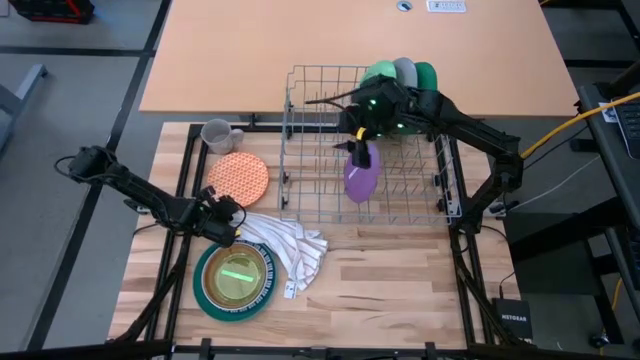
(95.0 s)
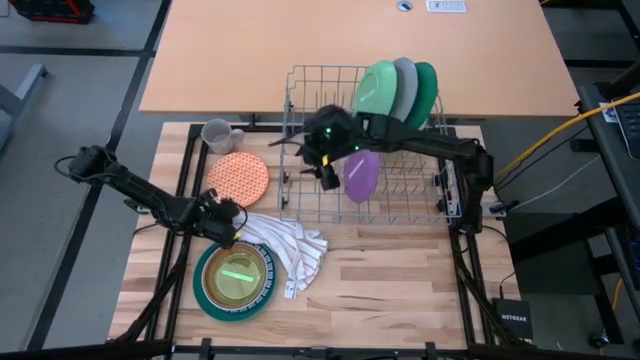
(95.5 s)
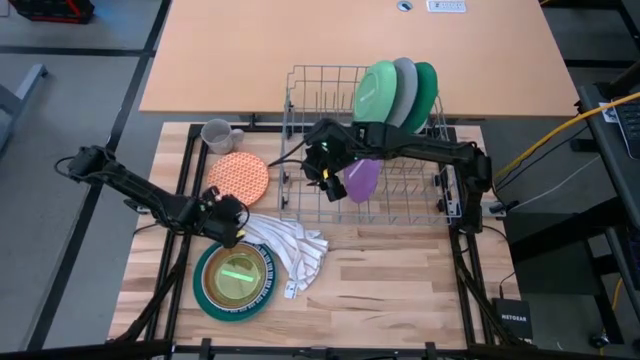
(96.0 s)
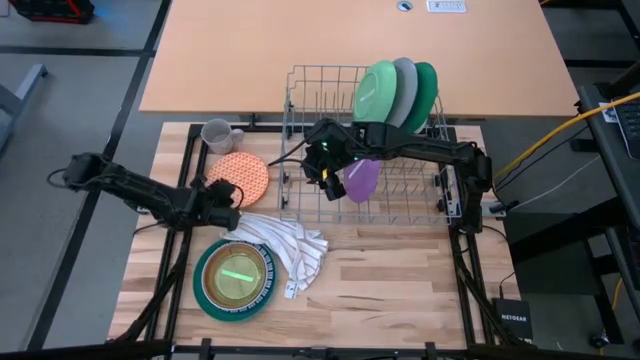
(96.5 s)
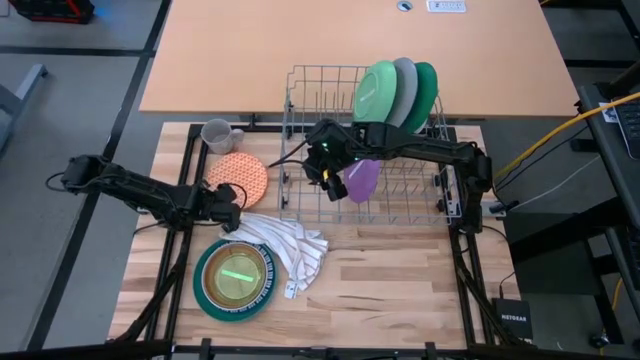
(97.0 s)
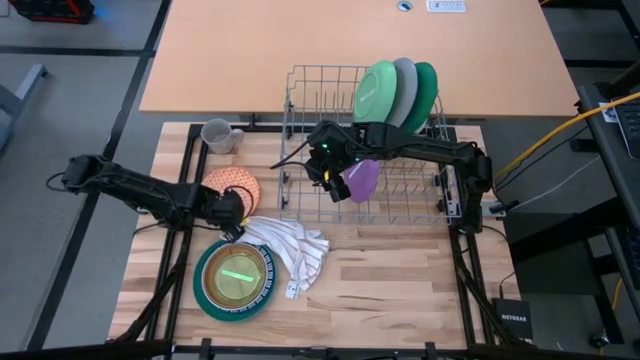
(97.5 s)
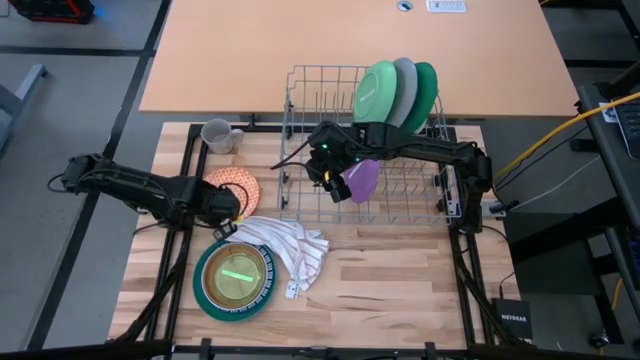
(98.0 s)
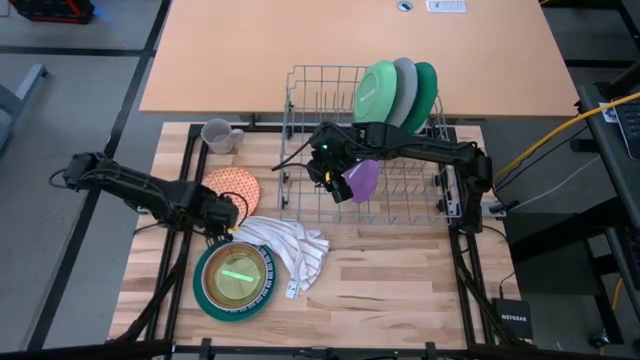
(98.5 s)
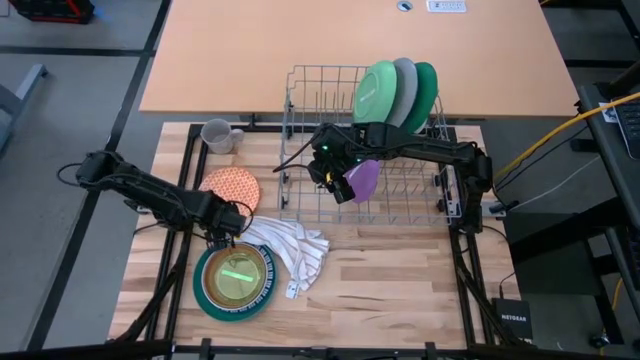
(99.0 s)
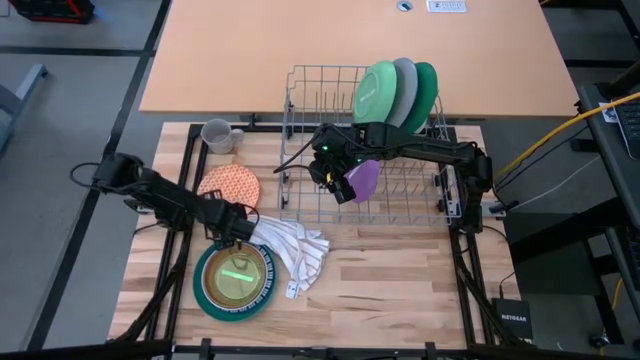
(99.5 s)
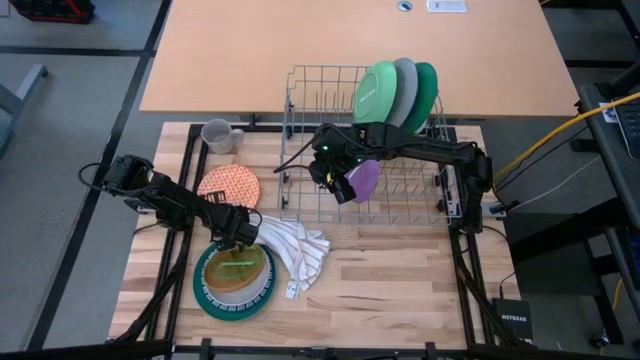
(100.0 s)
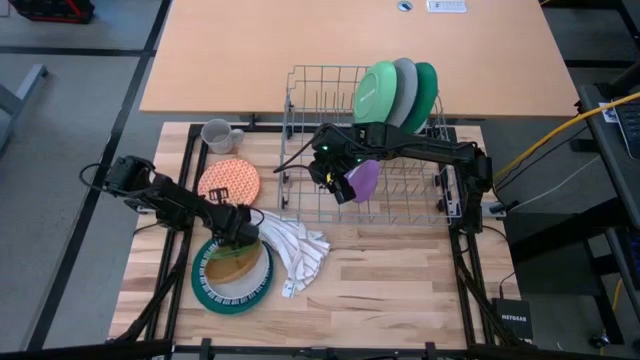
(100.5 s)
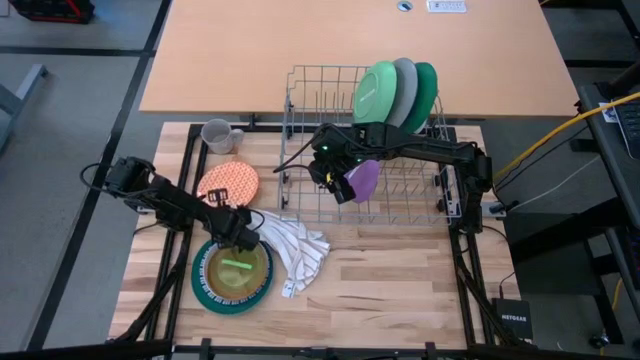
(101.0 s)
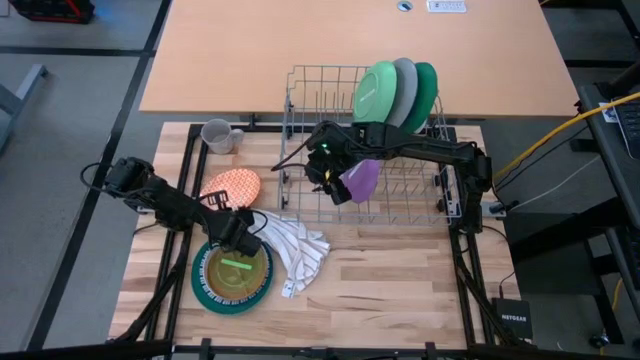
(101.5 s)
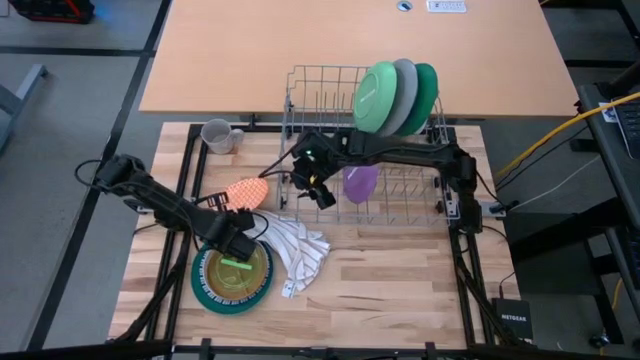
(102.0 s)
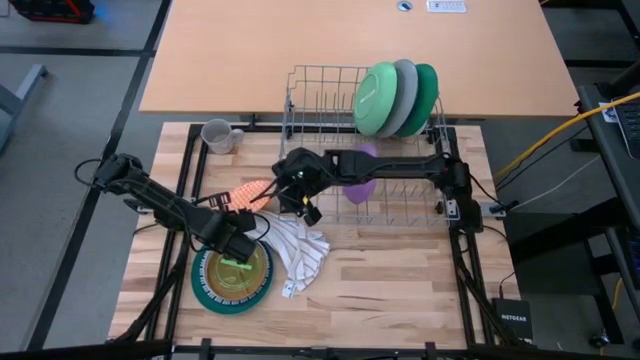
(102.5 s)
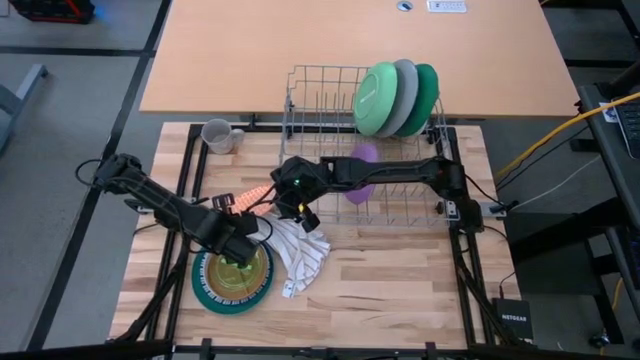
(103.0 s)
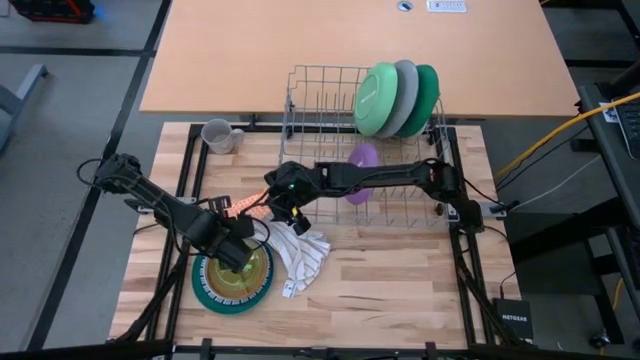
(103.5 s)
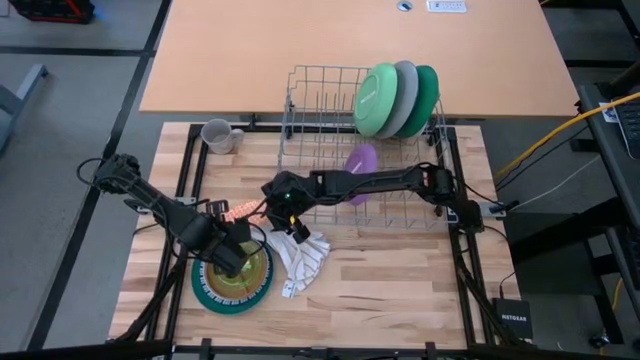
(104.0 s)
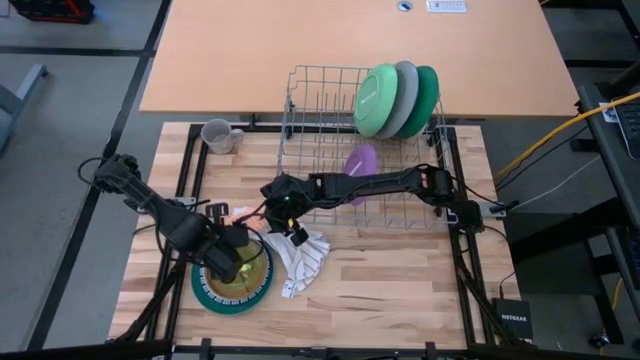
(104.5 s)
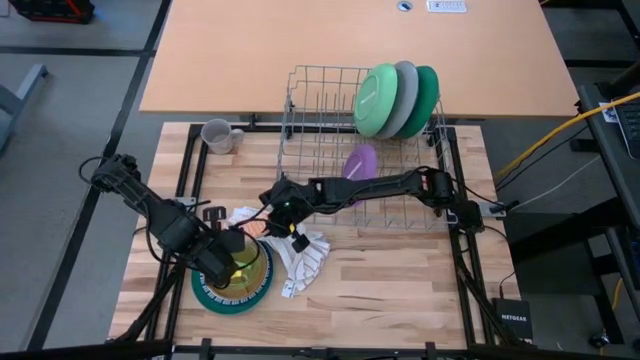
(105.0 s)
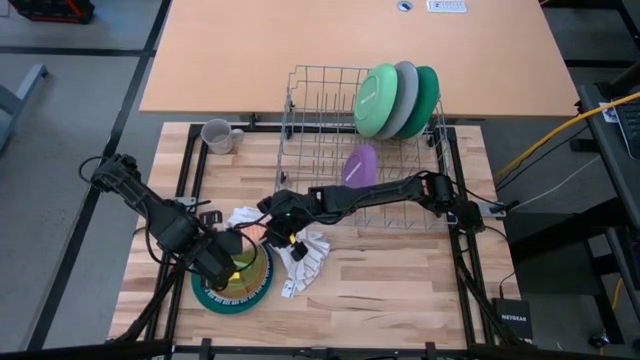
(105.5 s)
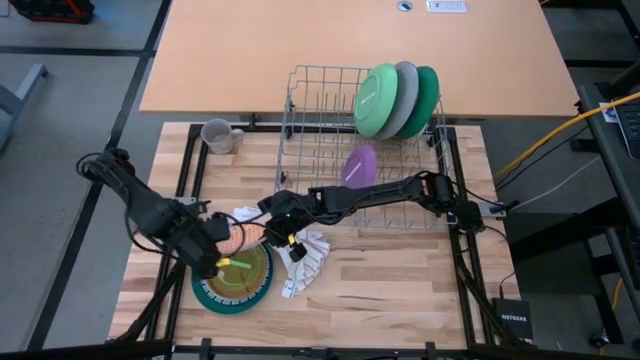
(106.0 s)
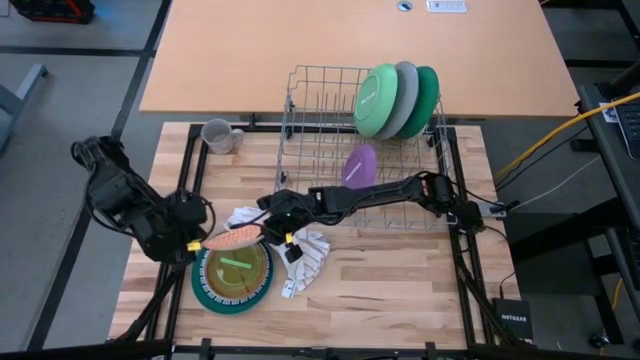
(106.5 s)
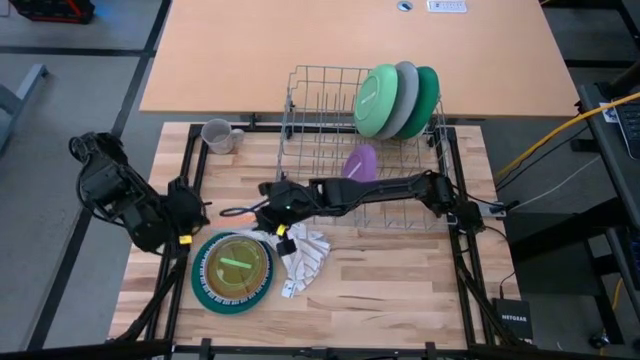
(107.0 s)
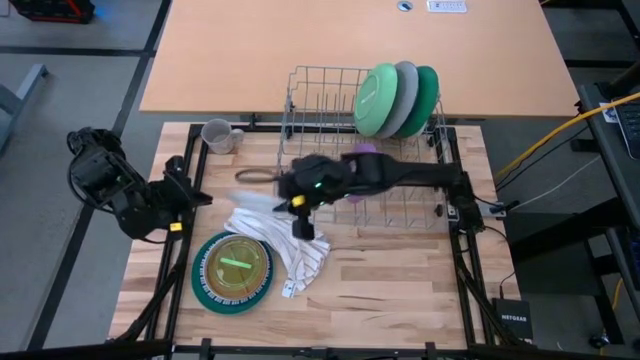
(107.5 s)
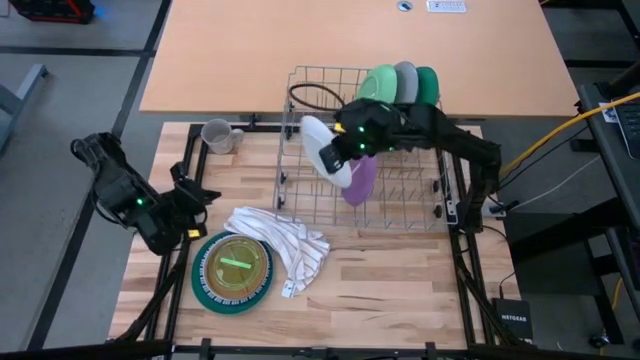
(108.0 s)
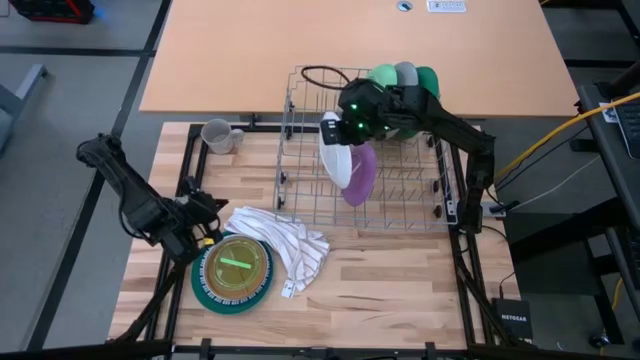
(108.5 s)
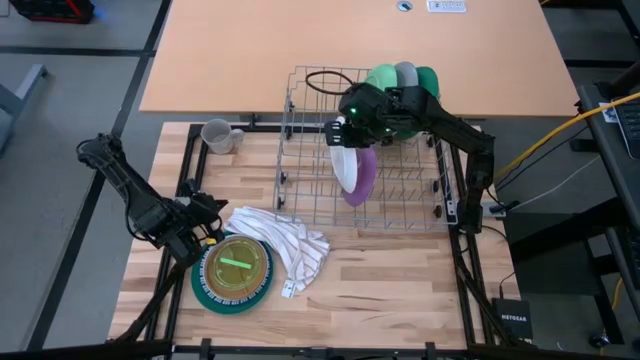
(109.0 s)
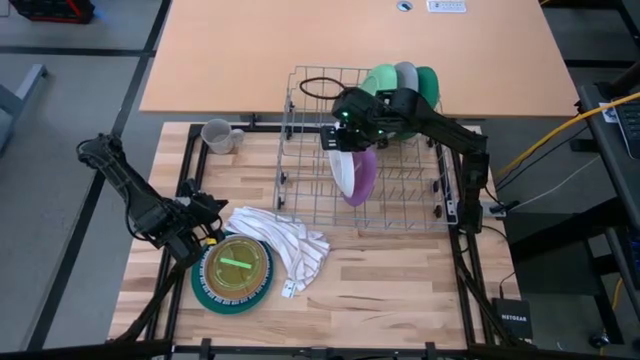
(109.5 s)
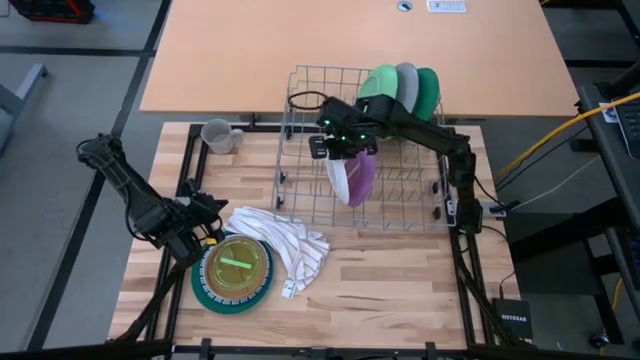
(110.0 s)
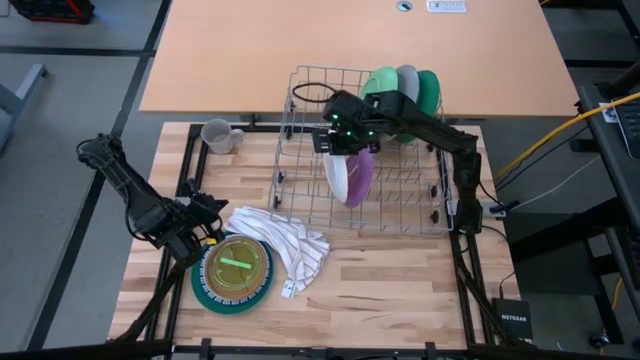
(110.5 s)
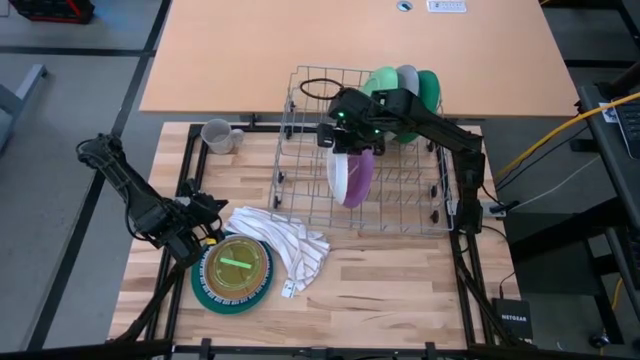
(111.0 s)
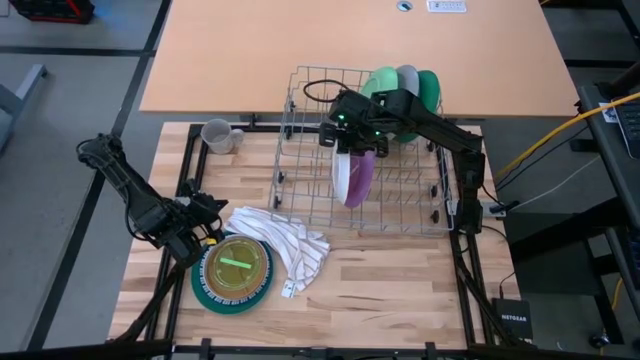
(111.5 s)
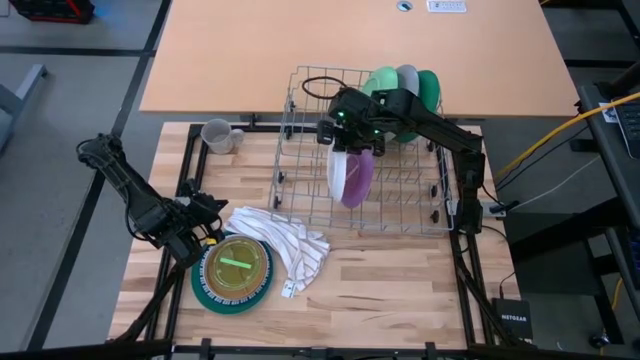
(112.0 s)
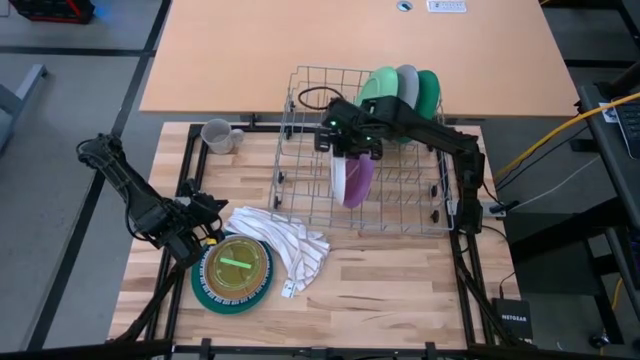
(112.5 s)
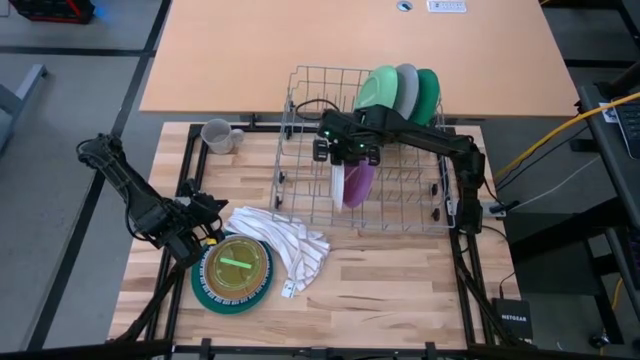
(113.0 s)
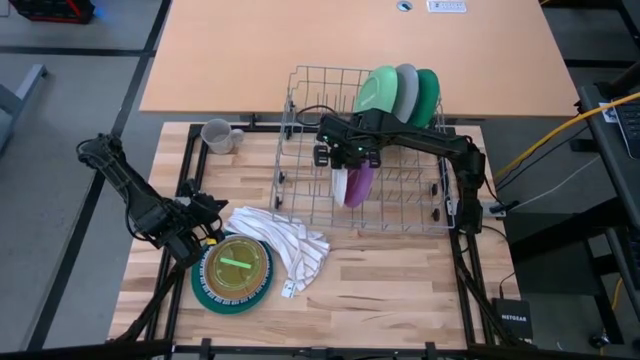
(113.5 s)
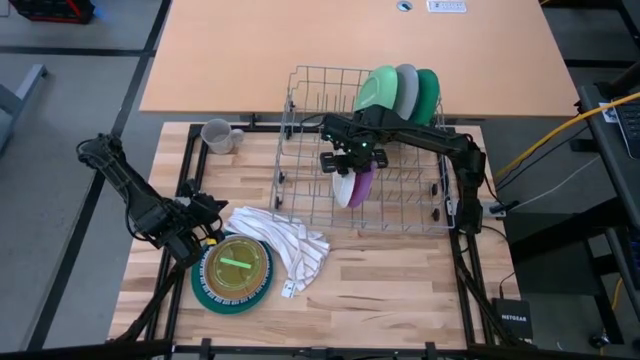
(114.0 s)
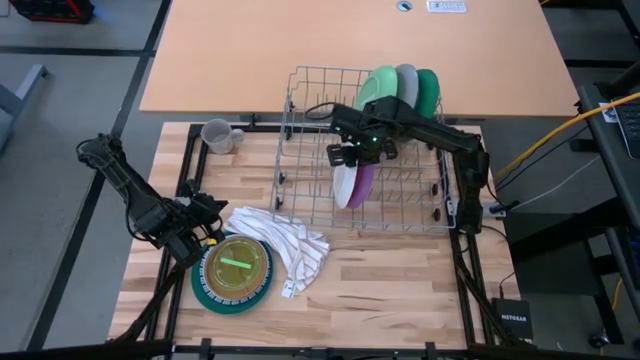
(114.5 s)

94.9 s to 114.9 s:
Task: Sort dishes
Put the orange patterned plate into the dish rack
